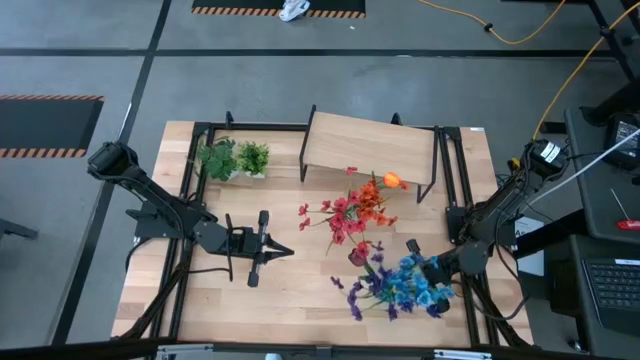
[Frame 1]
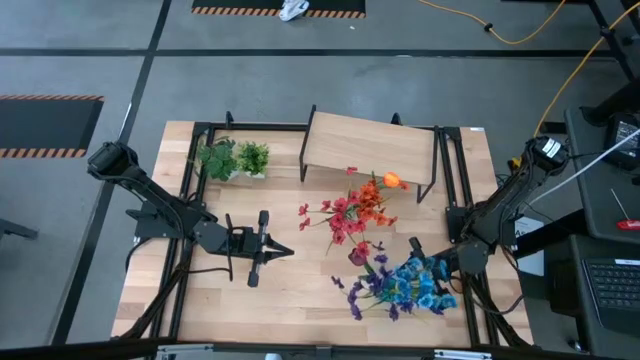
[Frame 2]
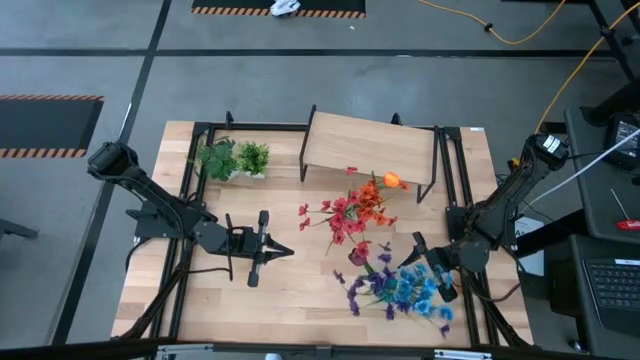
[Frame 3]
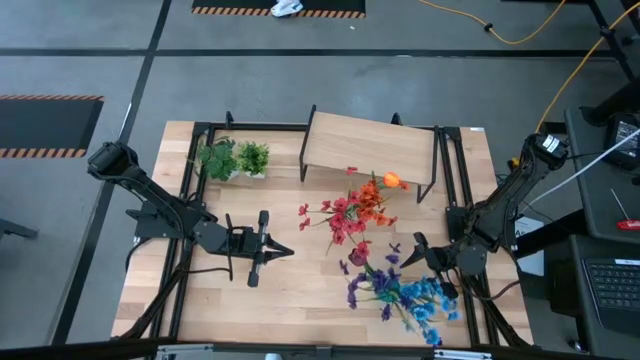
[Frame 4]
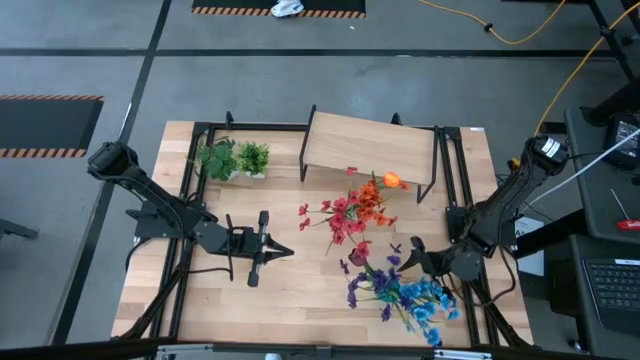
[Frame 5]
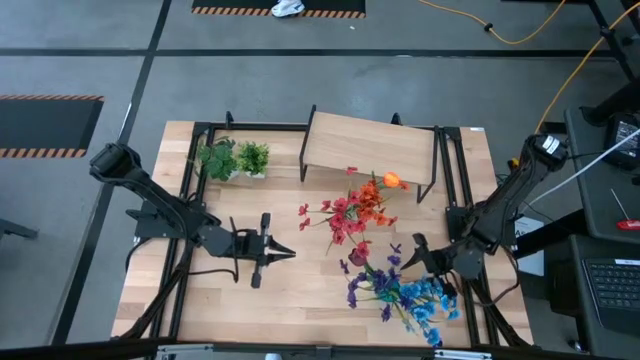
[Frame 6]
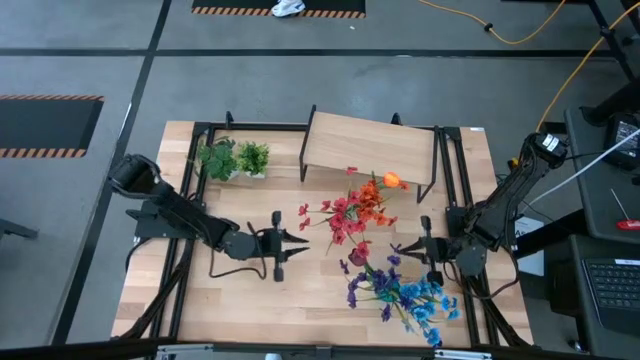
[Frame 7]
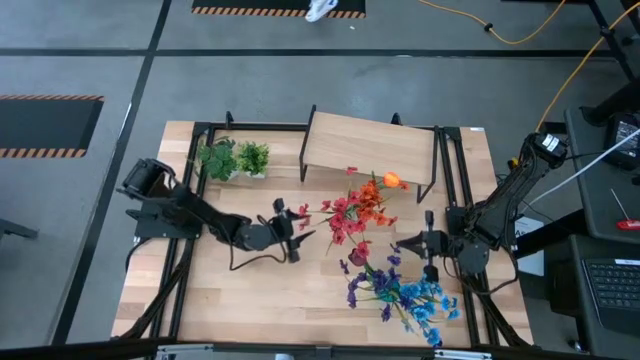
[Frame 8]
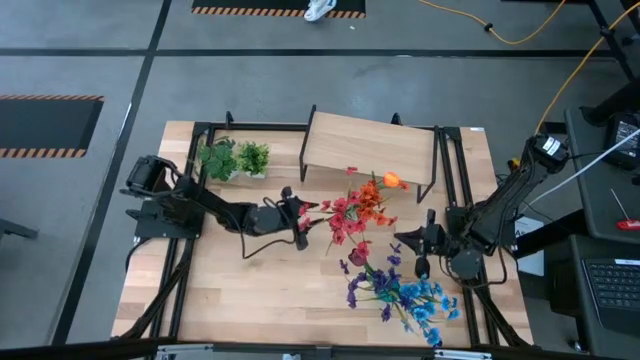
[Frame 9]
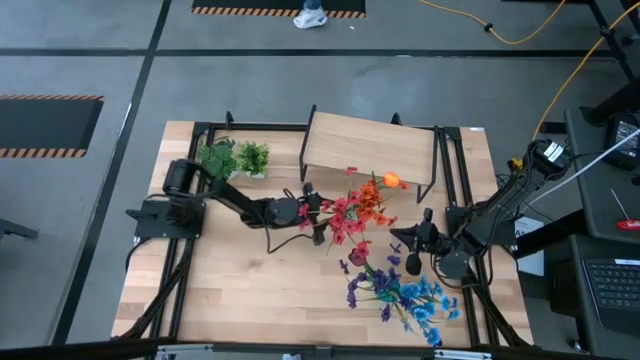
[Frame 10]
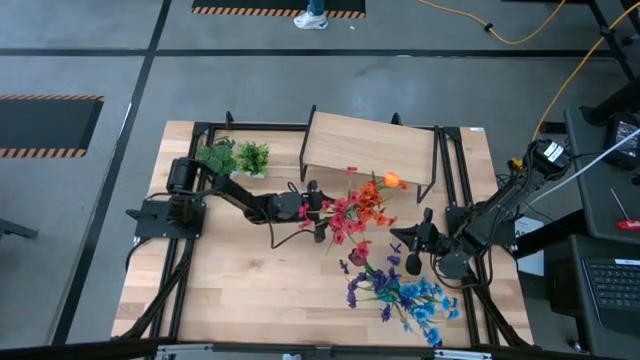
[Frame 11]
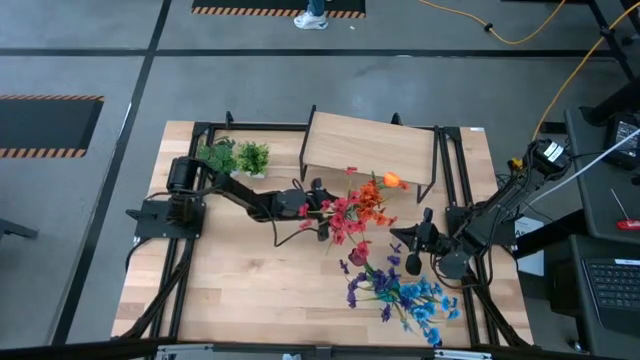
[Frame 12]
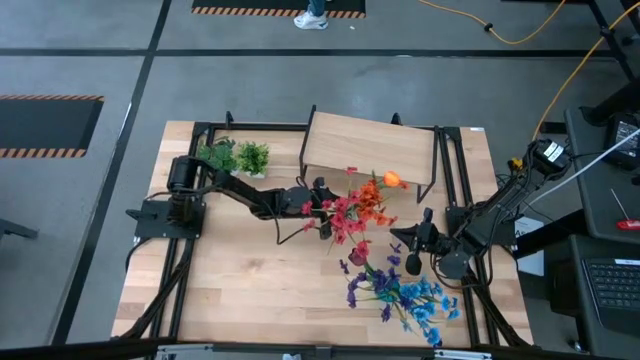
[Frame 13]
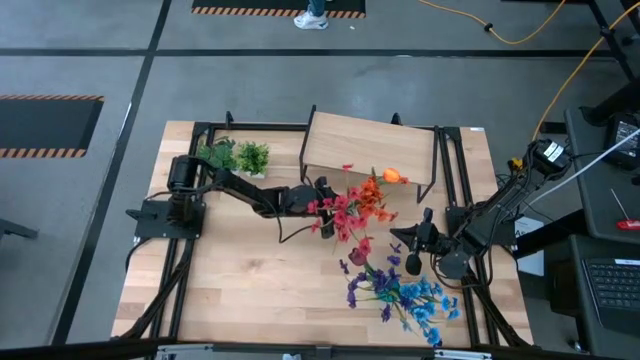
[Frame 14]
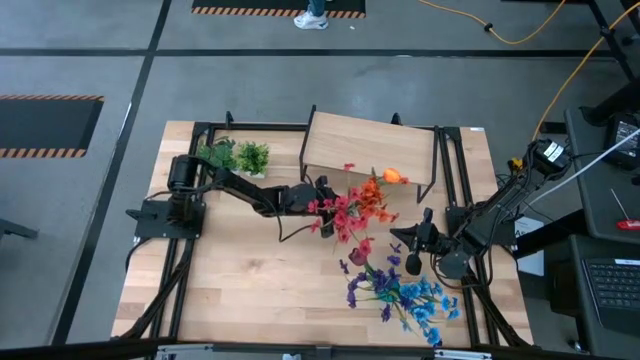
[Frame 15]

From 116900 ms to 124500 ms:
Task: Pick and place flowers into a vace then onto a shelf
Put the transparent vase on the shelf

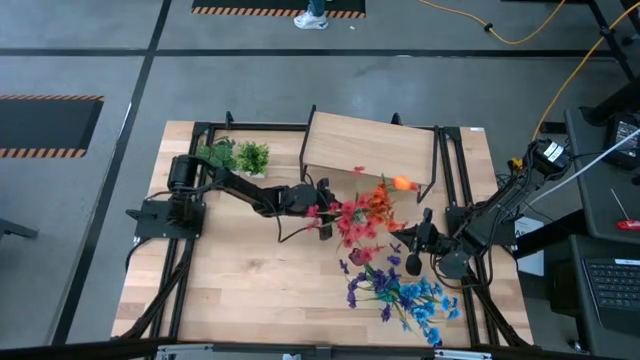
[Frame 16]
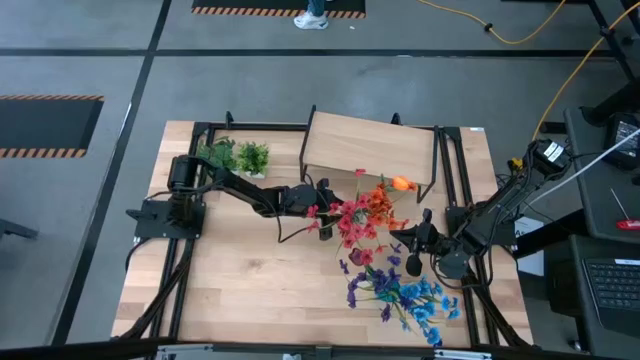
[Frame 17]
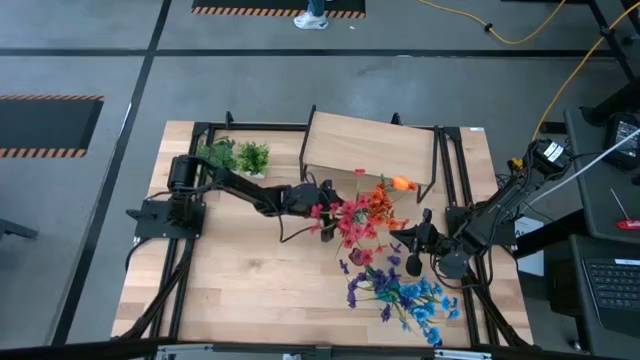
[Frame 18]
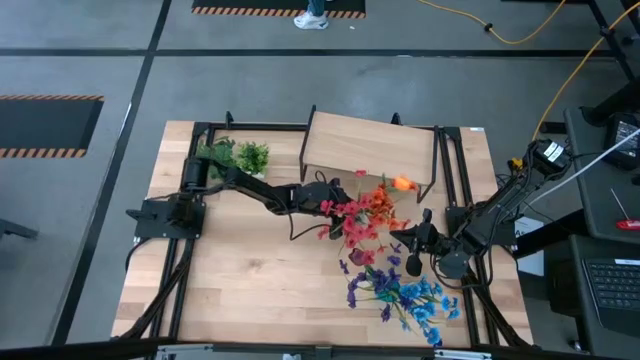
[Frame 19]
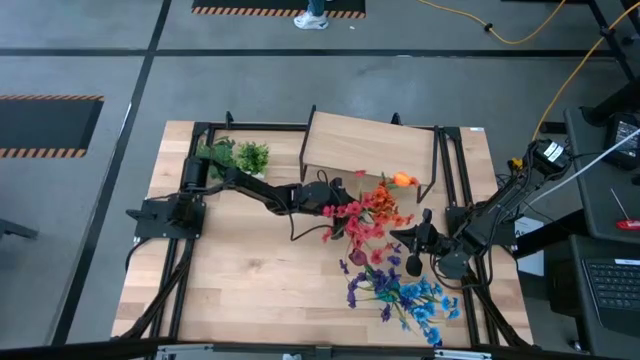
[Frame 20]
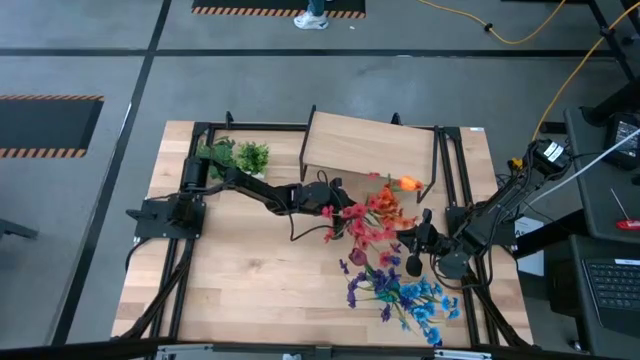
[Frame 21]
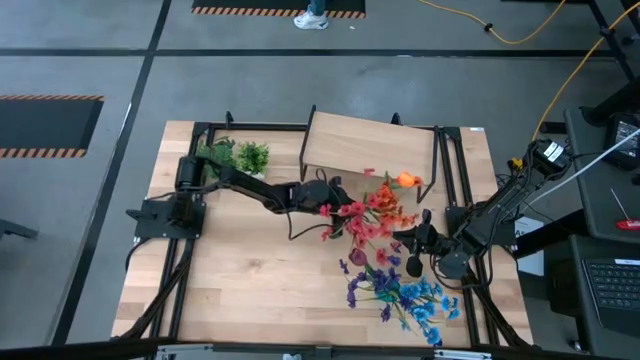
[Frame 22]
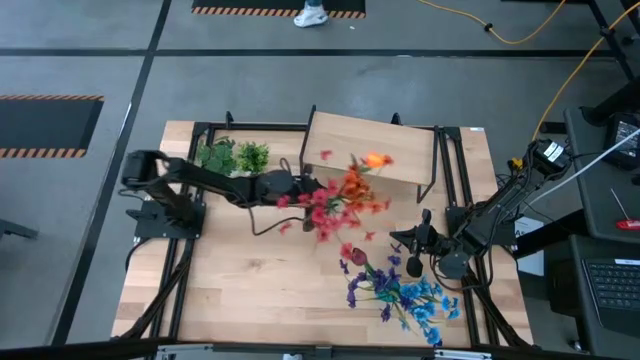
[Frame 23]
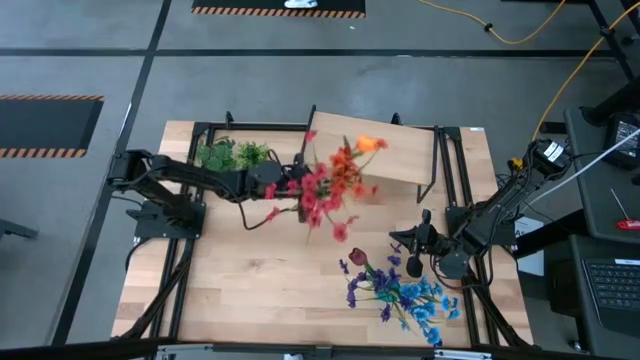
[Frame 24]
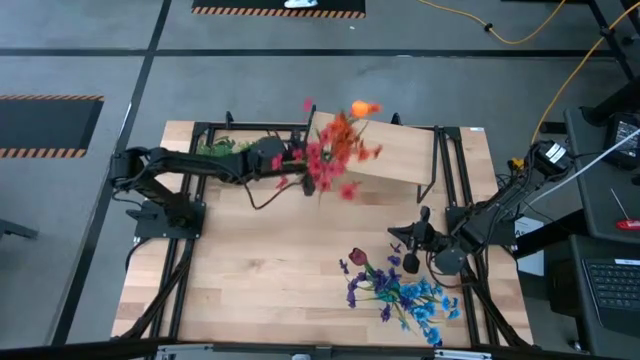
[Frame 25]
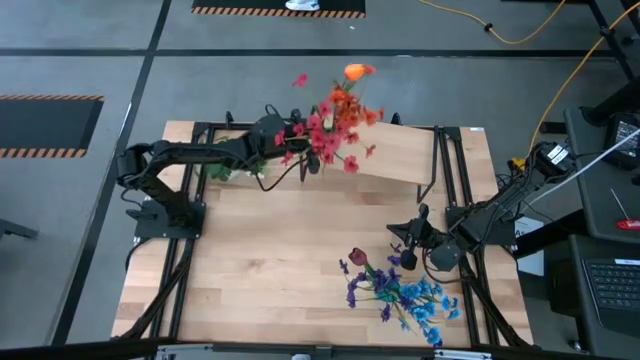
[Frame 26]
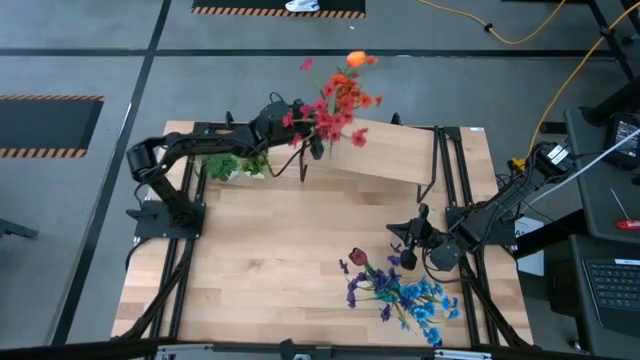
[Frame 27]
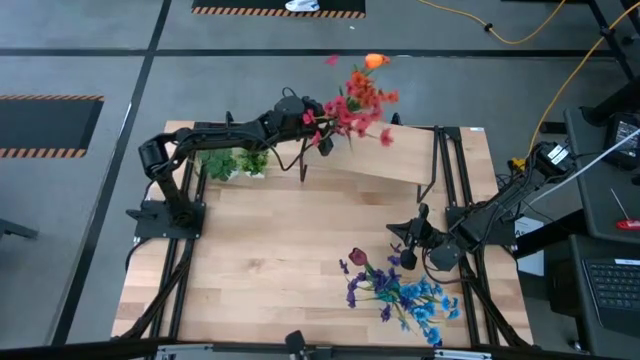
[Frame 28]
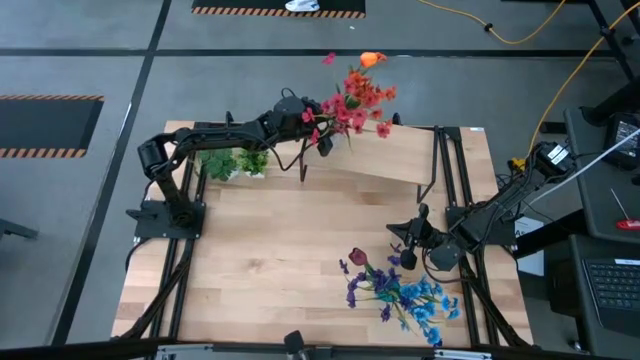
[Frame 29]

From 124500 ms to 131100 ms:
Put the transparent vase on the shelf

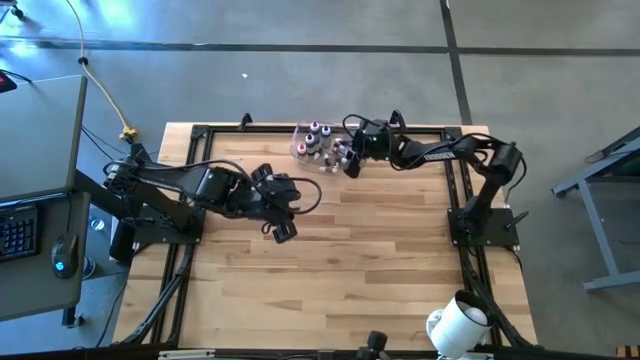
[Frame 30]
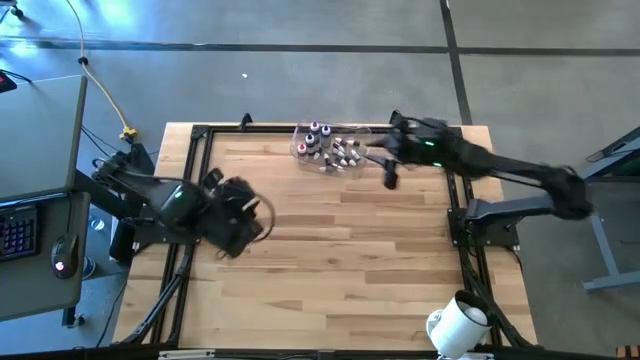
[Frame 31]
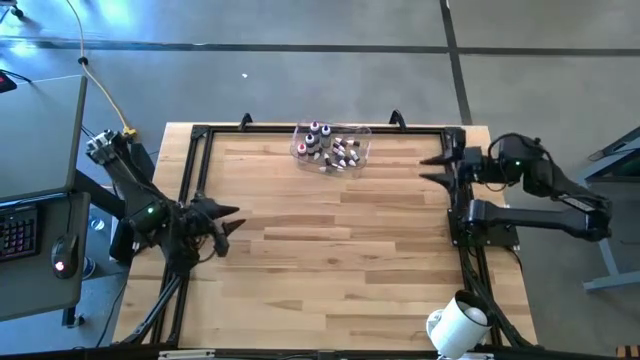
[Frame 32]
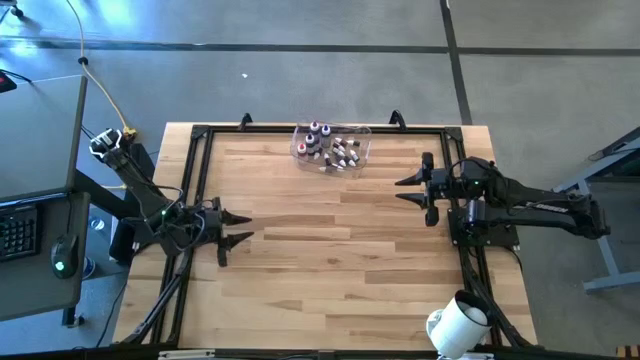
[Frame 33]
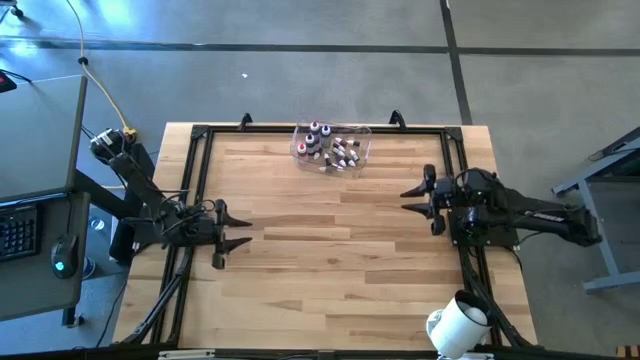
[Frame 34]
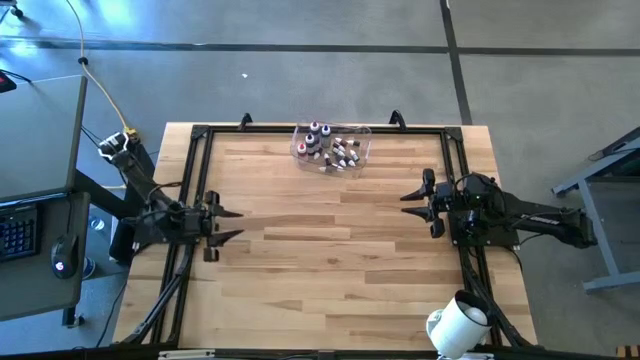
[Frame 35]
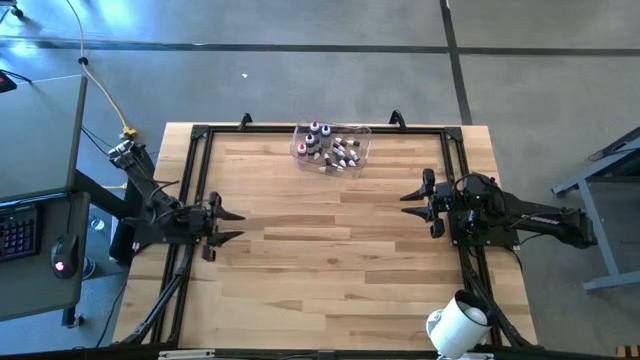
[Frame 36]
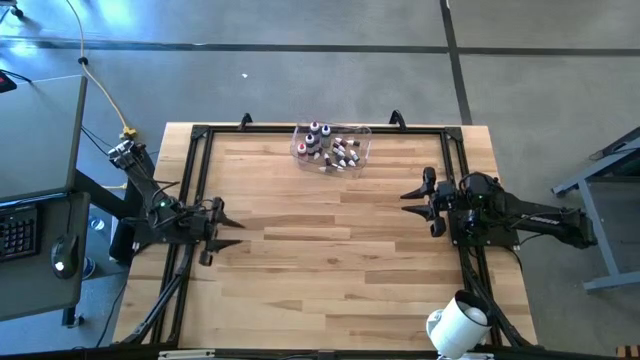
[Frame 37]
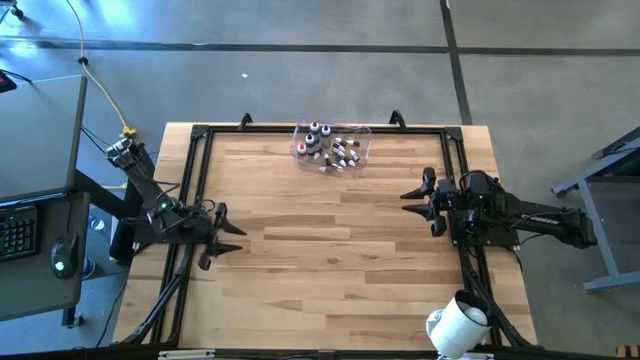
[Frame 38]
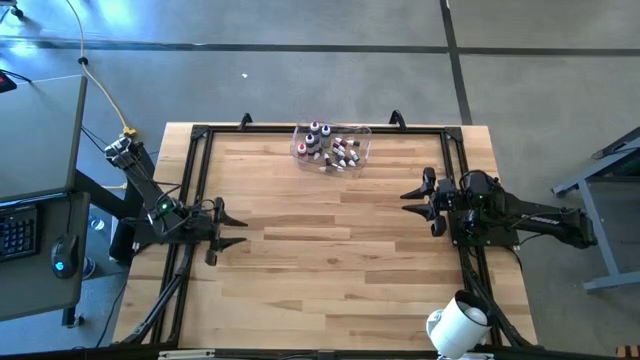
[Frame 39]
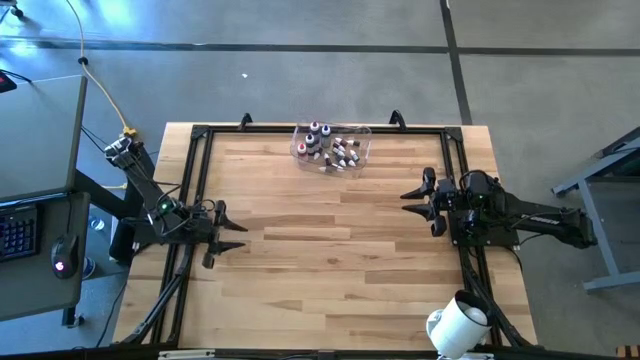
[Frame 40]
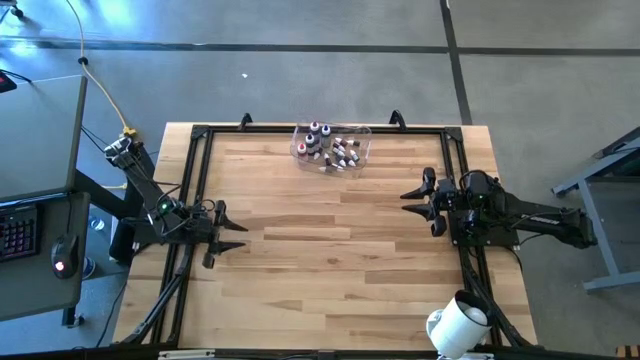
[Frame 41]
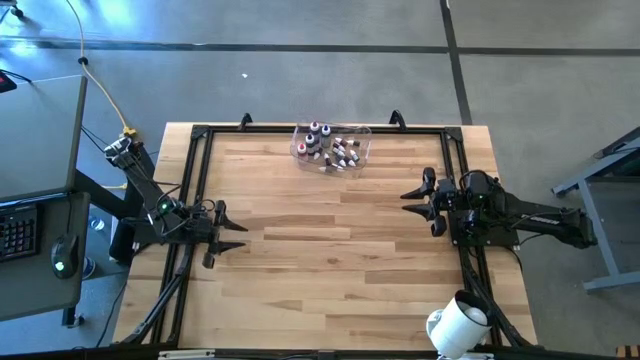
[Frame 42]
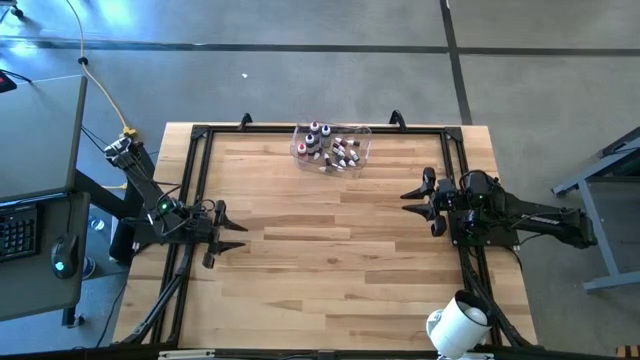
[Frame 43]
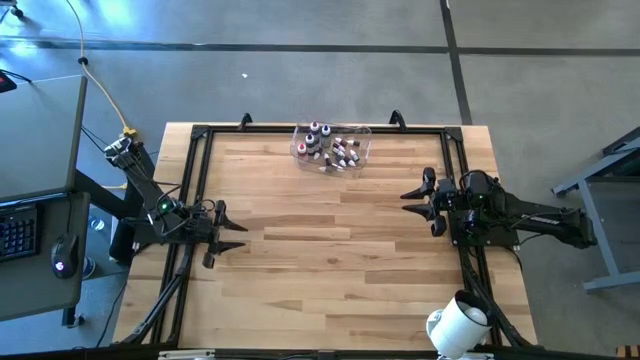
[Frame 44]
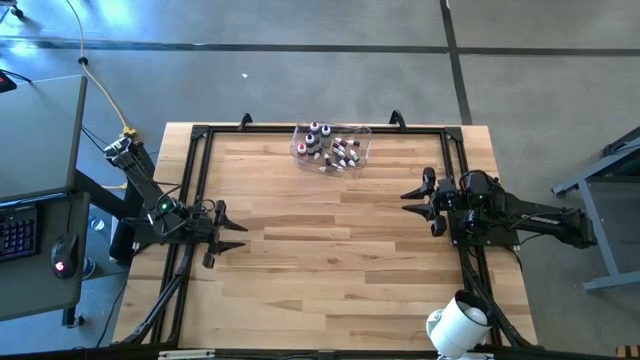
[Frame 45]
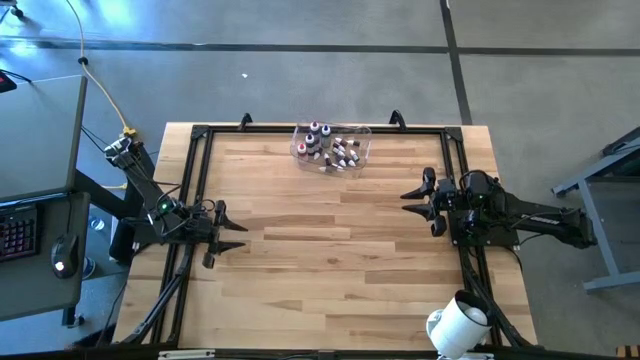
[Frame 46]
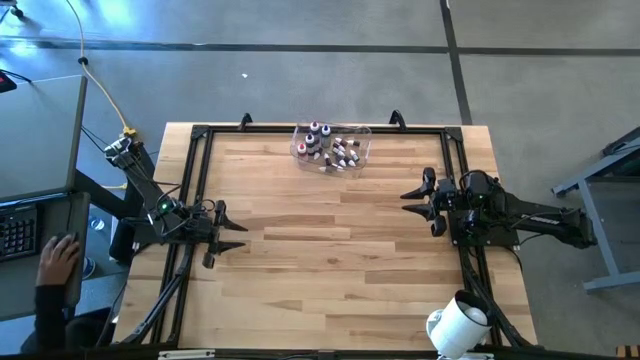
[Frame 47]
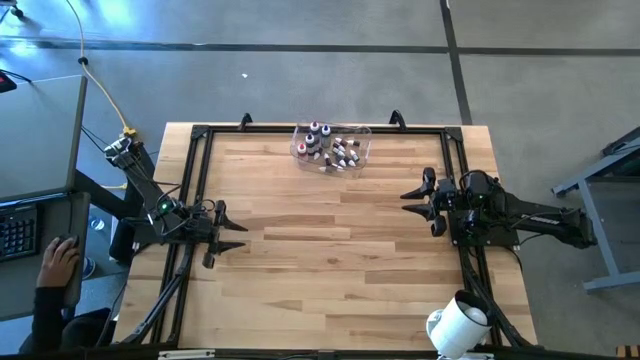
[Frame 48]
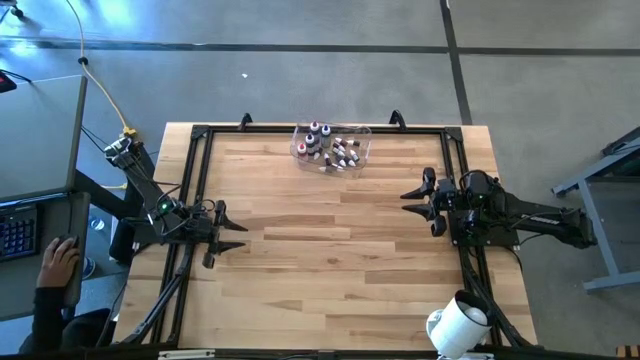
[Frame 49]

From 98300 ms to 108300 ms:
Task: Pick & Place food coloring
Return to Home Position
